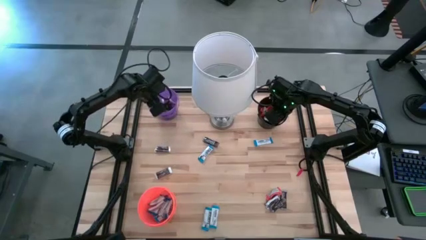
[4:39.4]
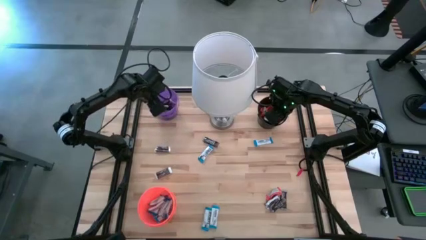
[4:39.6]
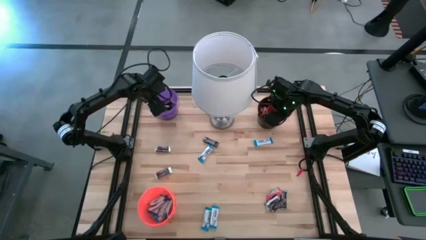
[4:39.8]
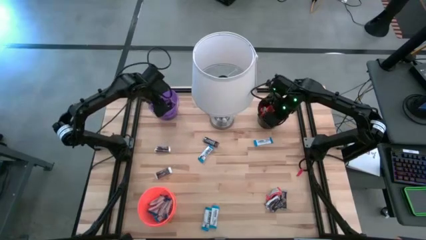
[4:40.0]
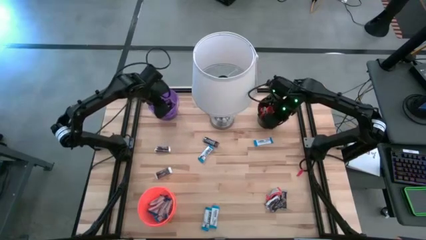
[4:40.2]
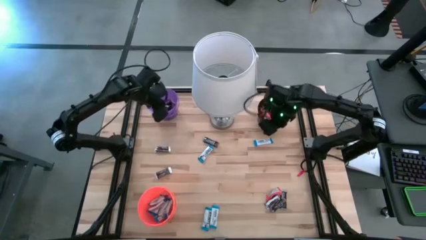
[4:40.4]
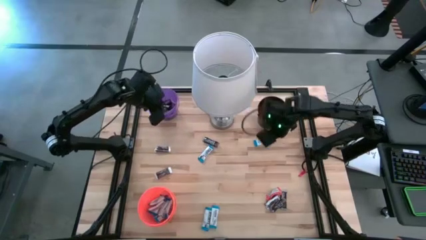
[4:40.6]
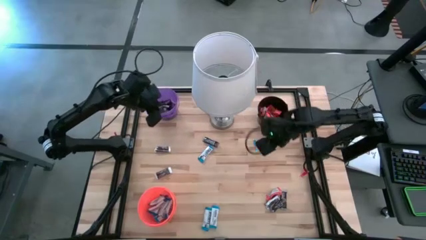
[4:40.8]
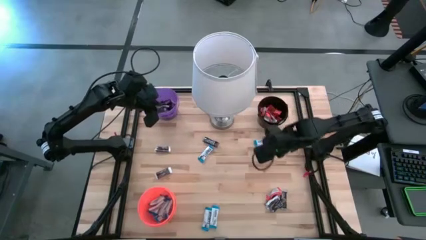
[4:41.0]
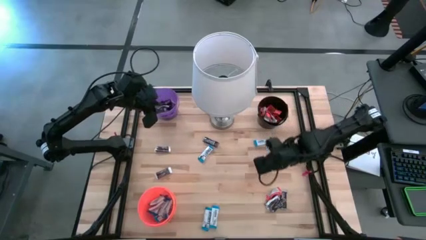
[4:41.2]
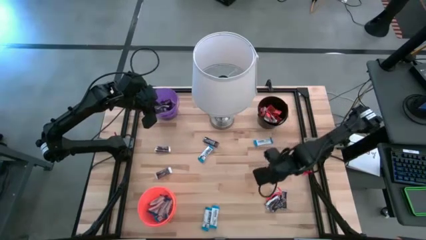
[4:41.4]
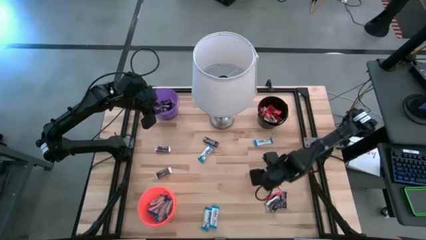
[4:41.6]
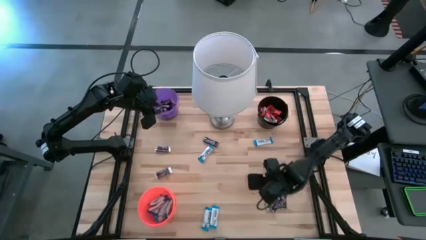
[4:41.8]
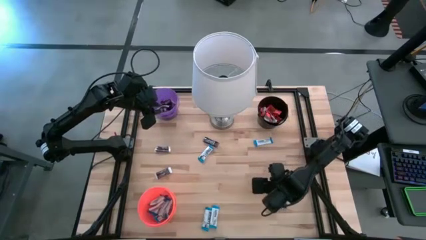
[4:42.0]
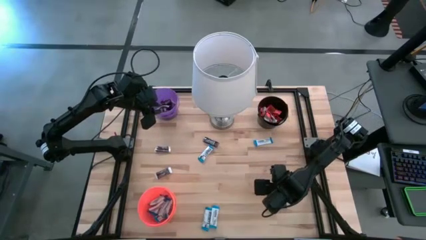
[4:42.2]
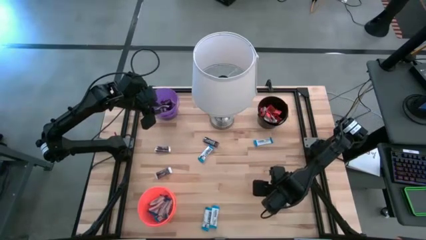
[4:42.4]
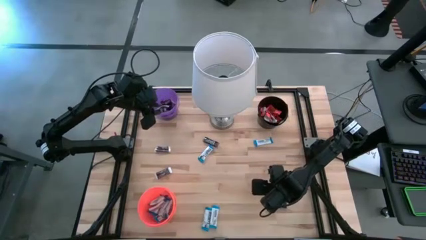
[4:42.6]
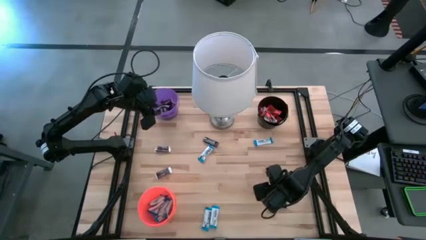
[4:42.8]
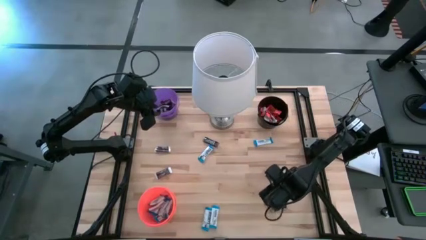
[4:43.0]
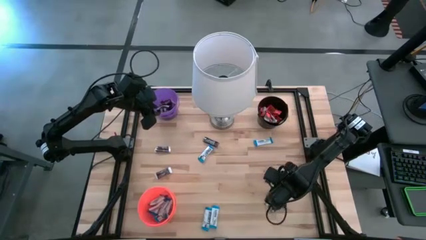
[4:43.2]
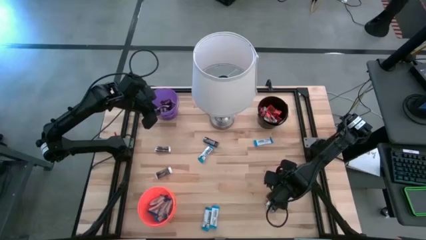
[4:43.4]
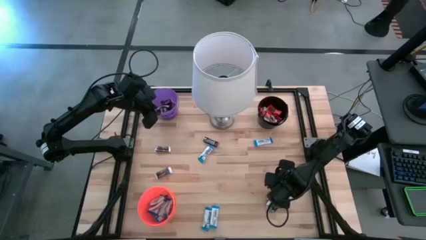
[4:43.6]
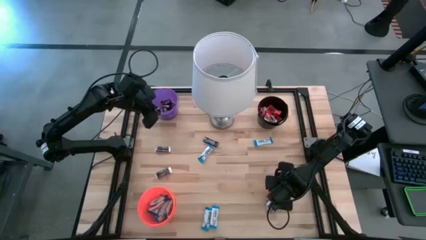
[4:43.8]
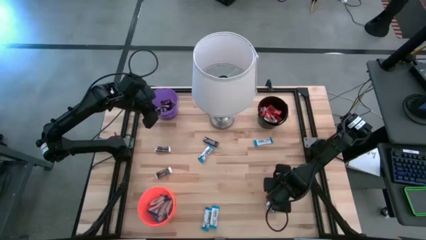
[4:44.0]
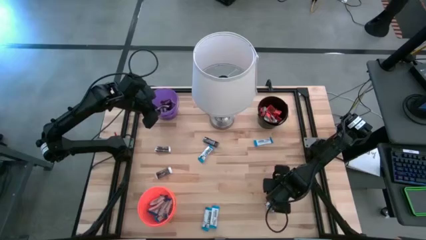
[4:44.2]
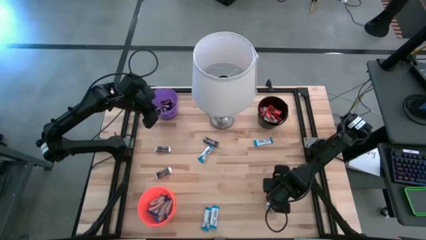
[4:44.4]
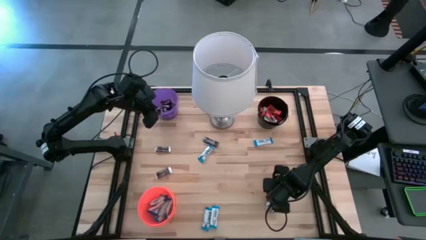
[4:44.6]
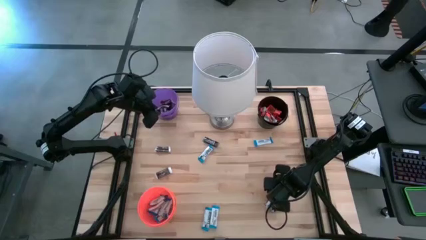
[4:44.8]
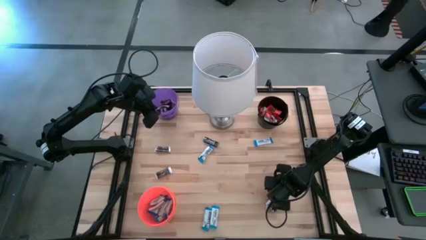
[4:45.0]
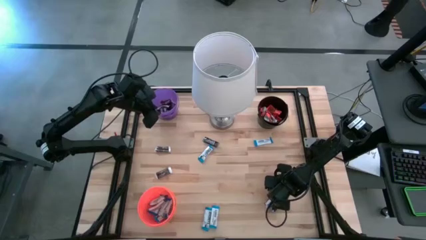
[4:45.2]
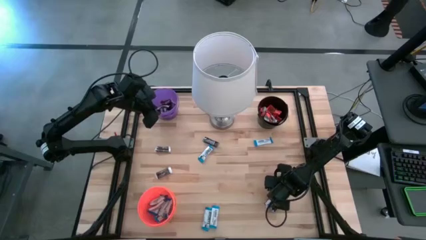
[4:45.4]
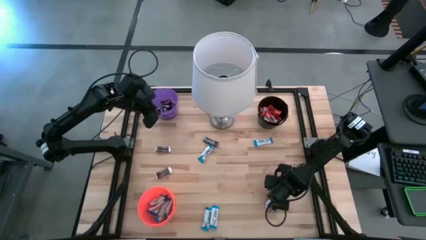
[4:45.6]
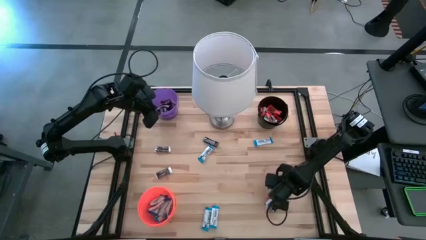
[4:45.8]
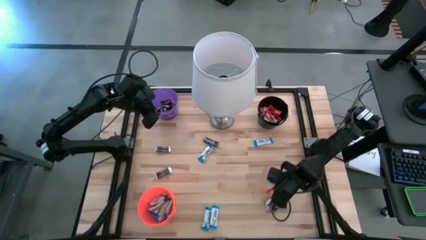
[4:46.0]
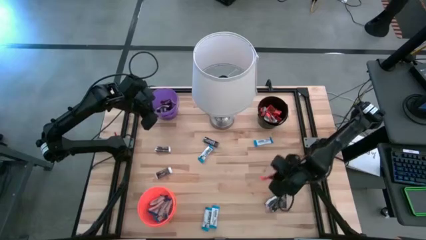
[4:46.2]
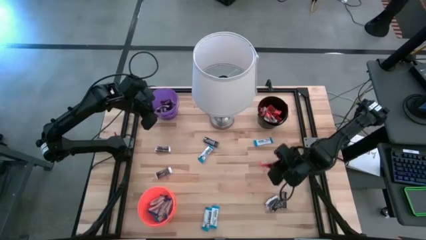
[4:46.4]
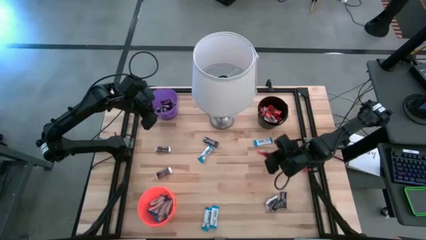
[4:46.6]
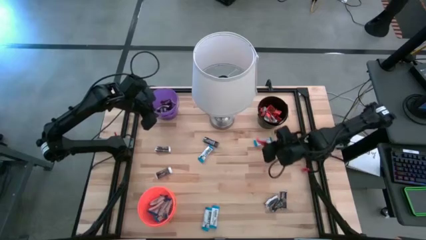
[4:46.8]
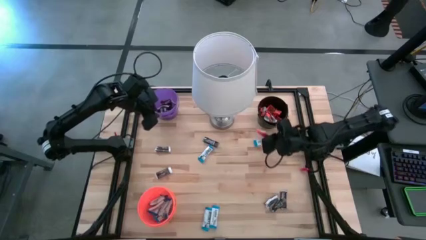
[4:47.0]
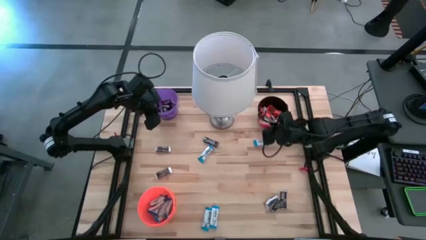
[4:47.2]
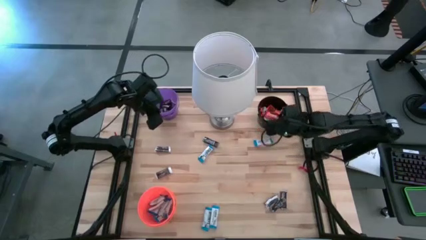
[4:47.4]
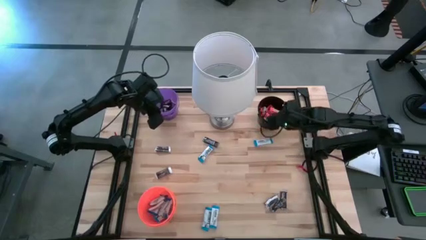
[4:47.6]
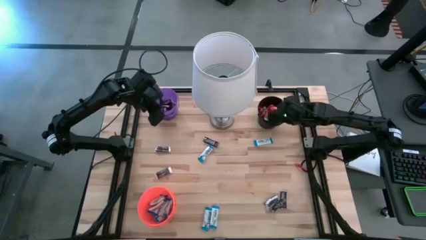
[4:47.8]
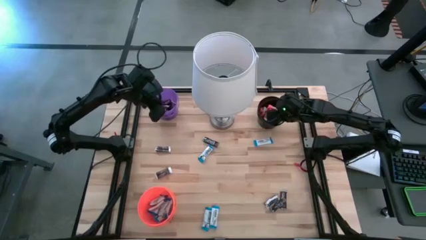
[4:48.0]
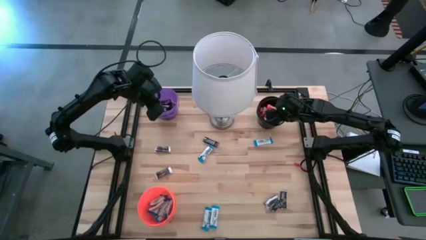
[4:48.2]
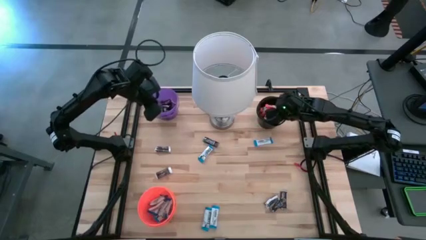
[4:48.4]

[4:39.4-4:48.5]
Task: Organize candy in baskets
Put the orange chocolate bar into the black bucket

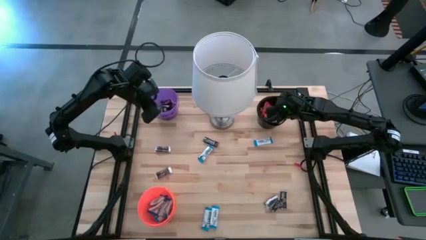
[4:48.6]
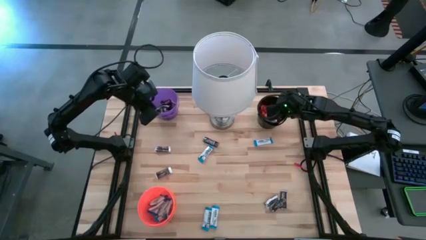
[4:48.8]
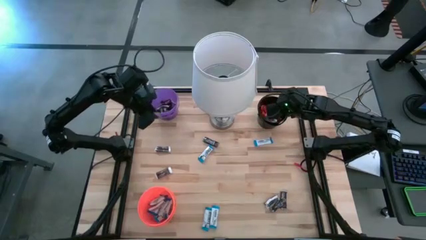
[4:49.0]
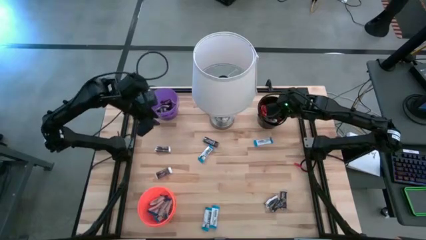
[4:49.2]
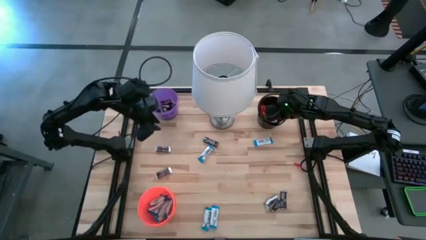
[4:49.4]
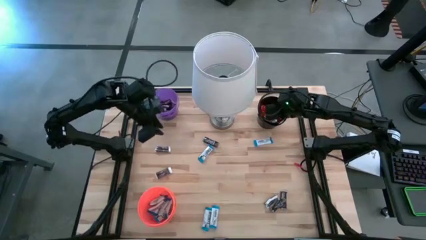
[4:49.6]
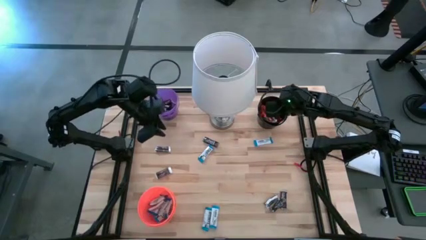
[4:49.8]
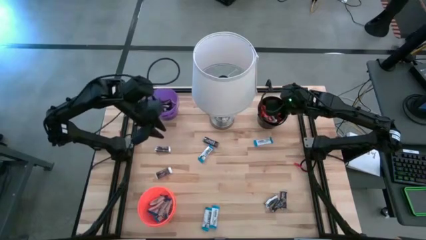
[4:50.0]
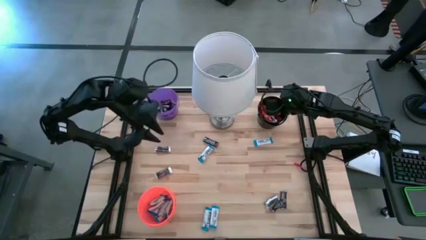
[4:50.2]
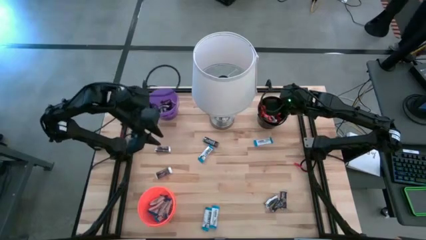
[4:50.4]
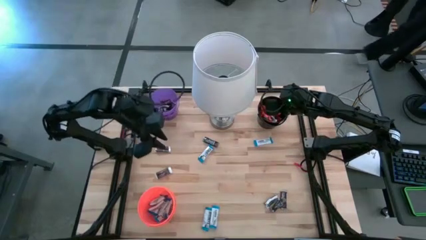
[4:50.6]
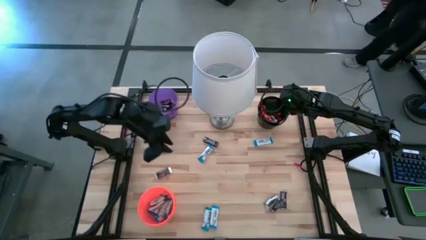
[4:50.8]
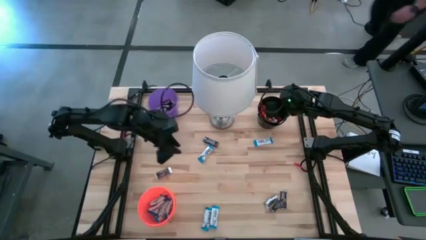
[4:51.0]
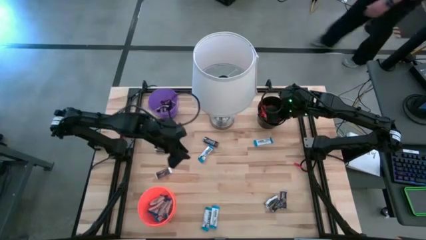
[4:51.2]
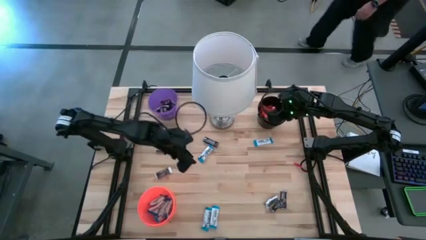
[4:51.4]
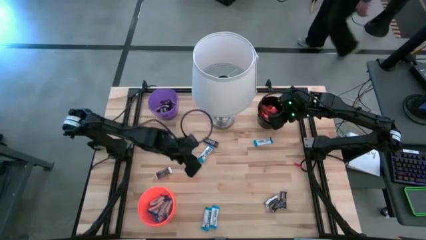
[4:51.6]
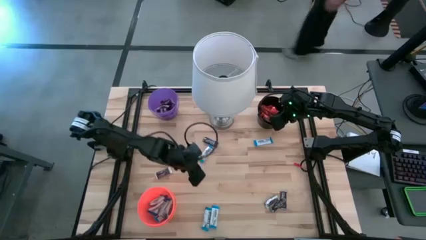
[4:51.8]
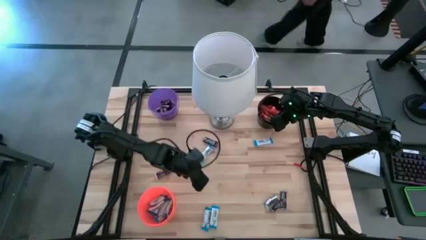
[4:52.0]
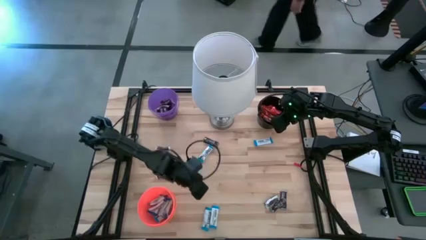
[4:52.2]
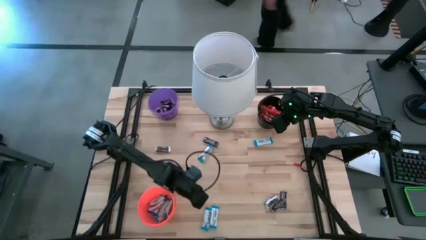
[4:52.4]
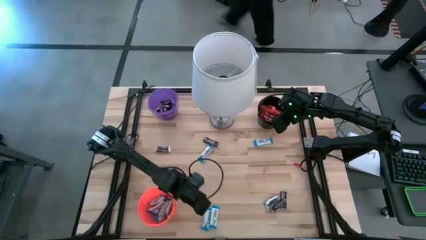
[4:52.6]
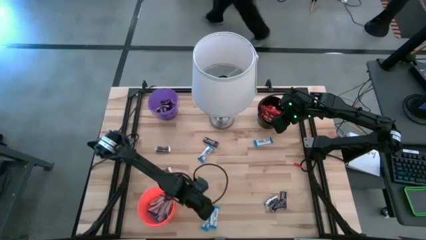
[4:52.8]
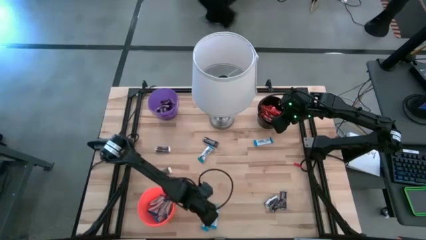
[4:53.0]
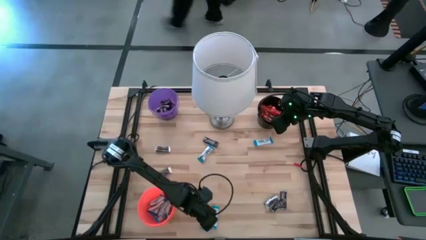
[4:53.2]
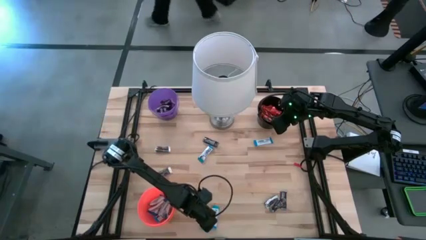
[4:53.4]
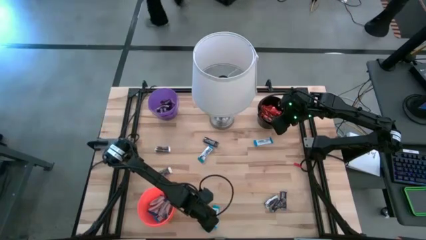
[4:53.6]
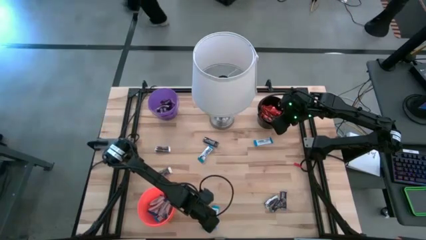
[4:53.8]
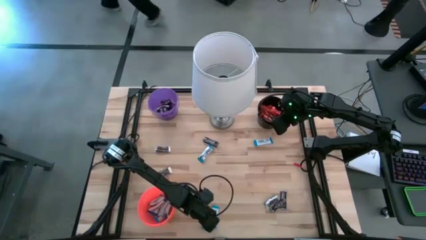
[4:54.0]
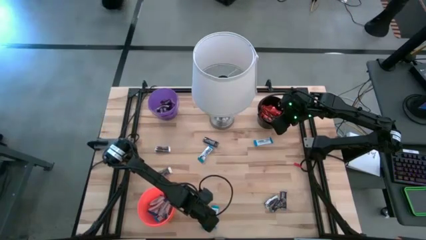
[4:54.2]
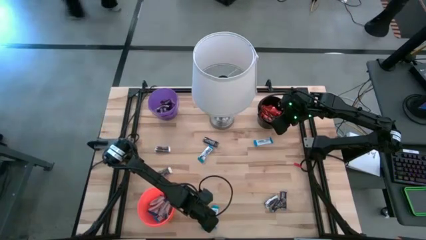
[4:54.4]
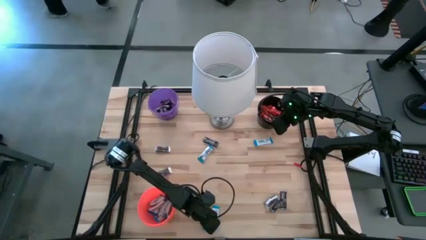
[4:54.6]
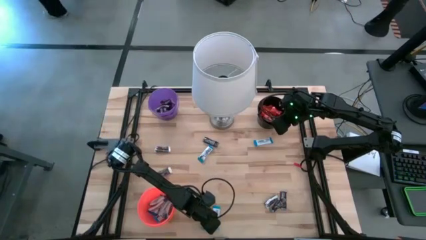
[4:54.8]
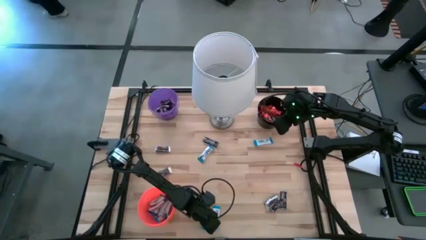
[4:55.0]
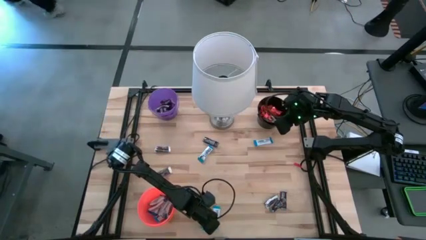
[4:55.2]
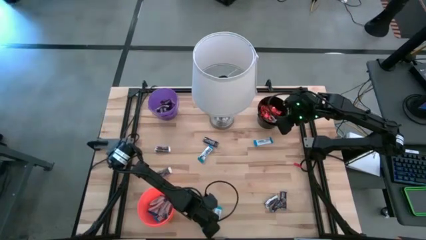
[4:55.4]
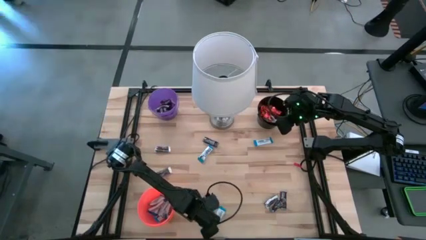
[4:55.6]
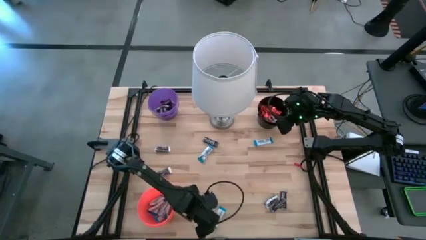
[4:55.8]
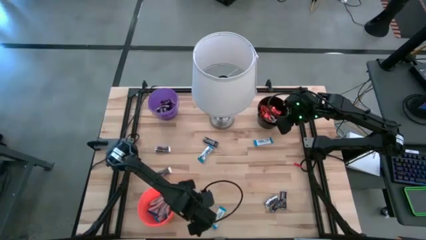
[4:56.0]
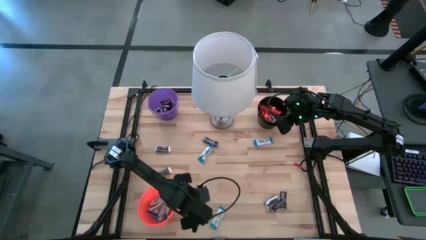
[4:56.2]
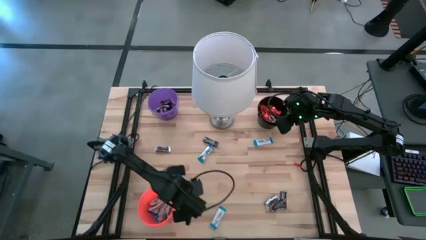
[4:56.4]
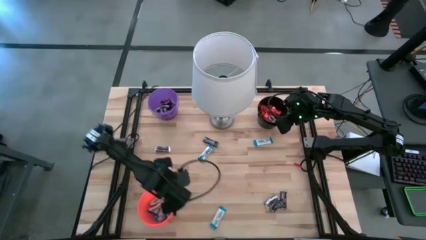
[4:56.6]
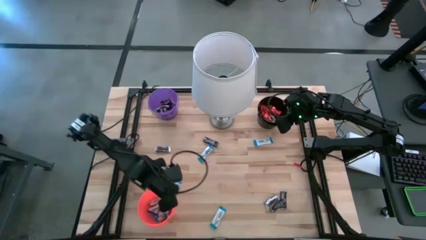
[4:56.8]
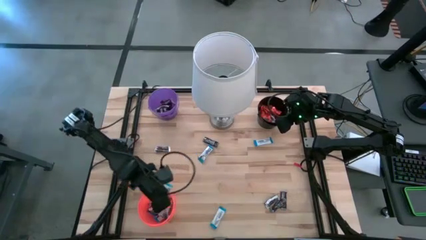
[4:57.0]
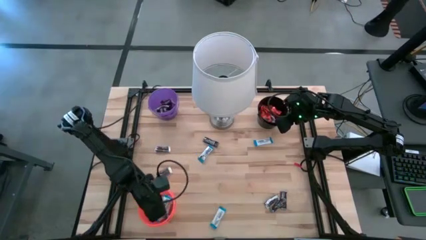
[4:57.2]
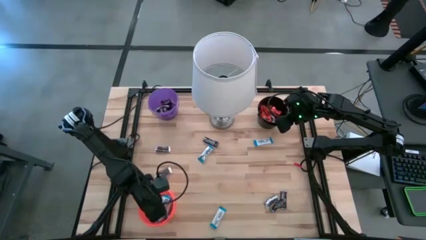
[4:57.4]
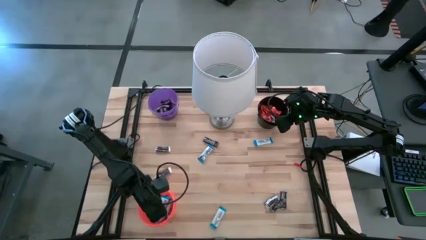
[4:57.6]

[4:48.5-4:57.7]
Put the white chocolate bar into the orange bucket
